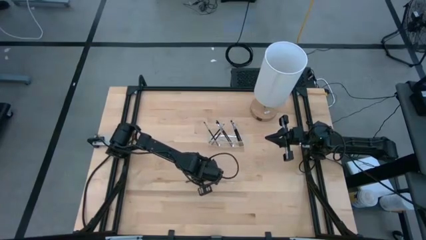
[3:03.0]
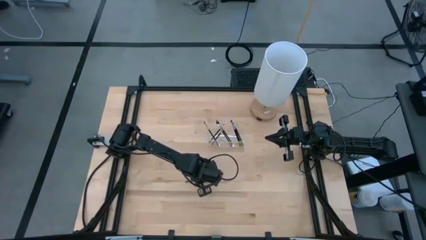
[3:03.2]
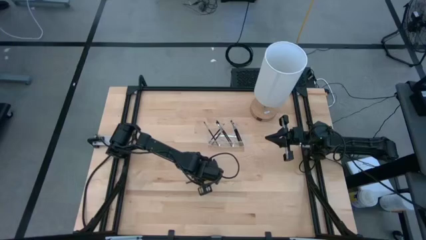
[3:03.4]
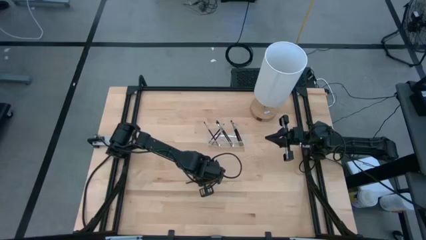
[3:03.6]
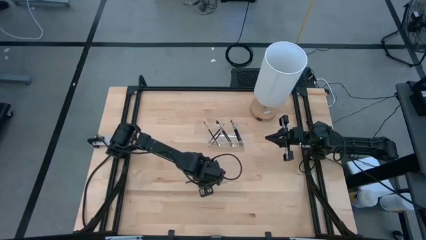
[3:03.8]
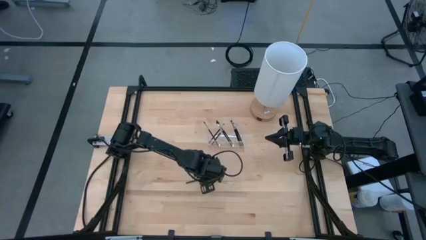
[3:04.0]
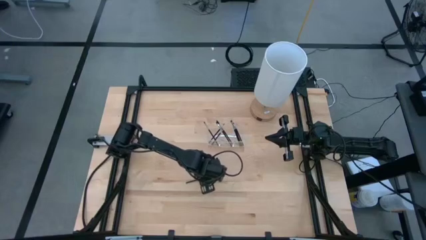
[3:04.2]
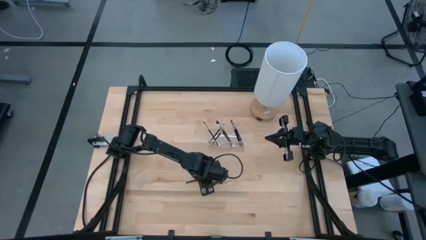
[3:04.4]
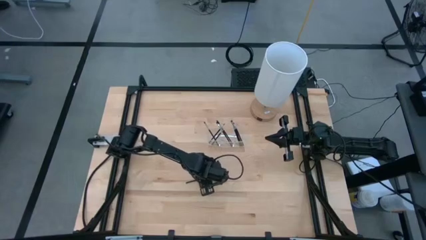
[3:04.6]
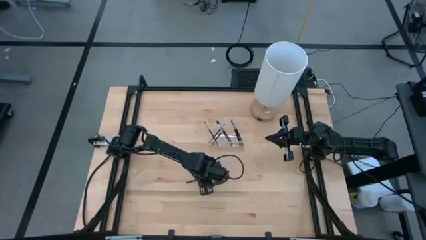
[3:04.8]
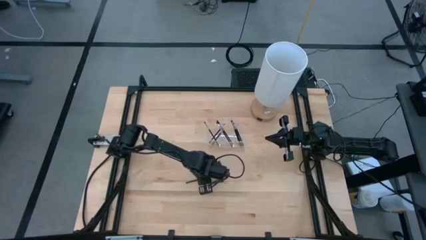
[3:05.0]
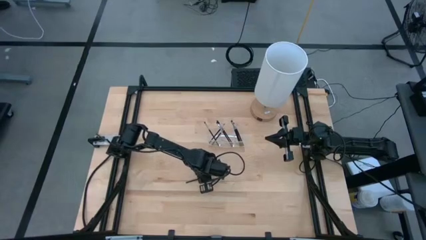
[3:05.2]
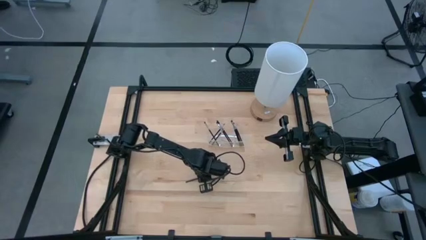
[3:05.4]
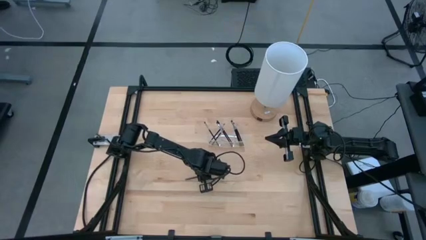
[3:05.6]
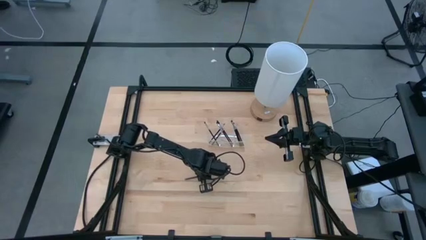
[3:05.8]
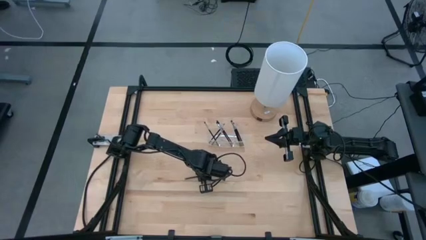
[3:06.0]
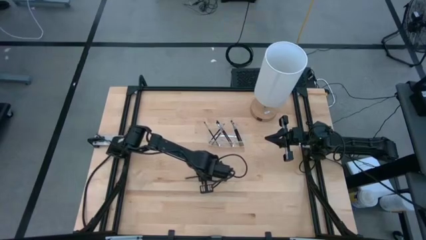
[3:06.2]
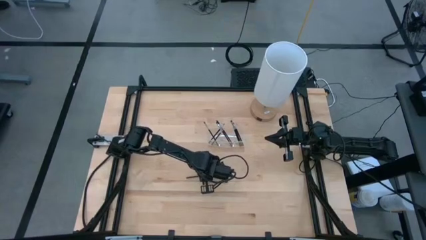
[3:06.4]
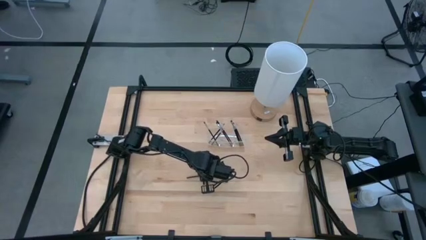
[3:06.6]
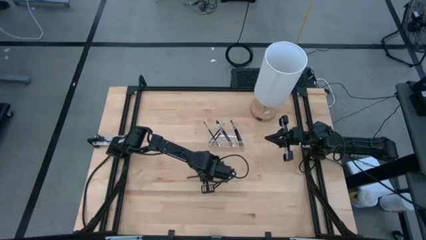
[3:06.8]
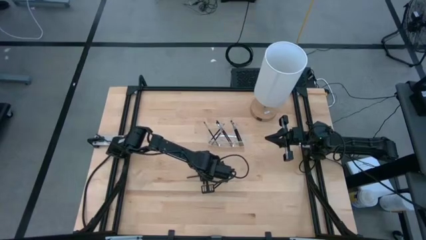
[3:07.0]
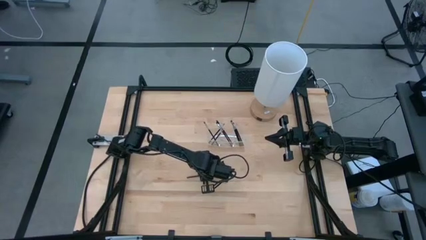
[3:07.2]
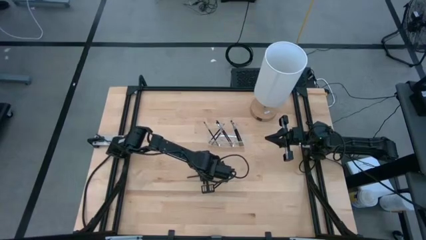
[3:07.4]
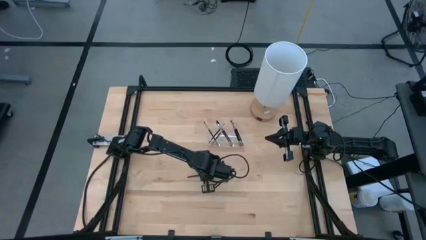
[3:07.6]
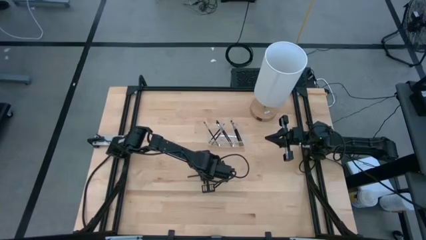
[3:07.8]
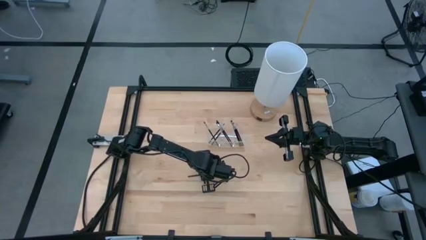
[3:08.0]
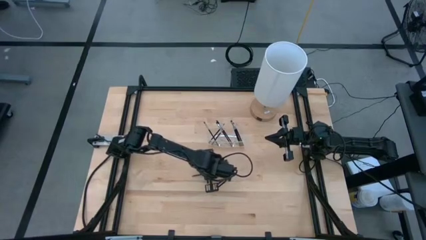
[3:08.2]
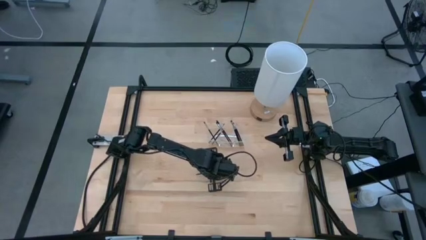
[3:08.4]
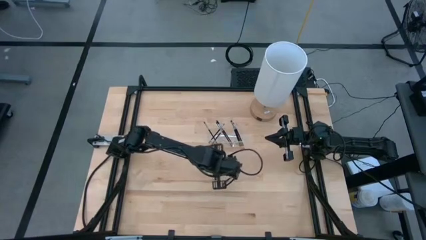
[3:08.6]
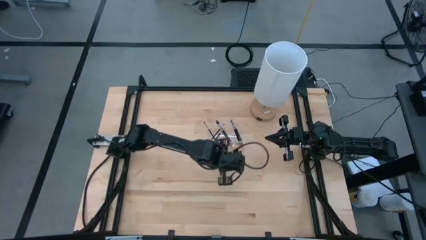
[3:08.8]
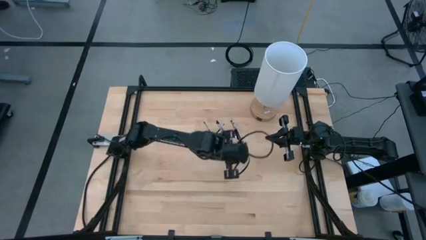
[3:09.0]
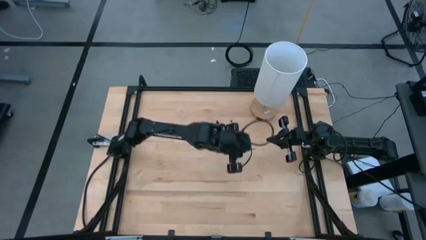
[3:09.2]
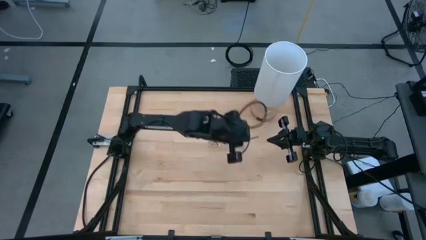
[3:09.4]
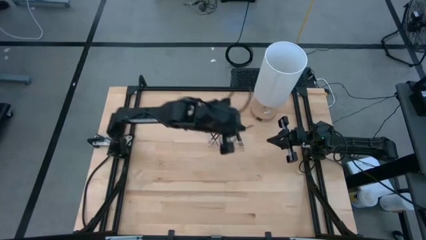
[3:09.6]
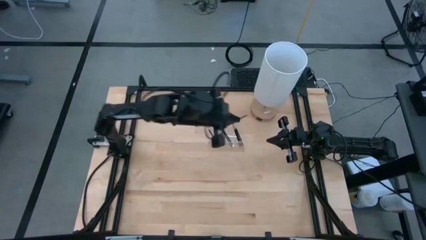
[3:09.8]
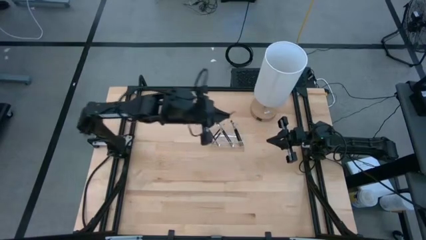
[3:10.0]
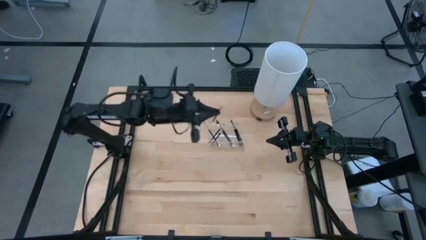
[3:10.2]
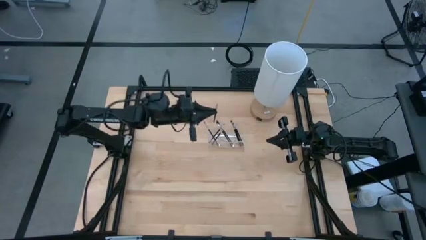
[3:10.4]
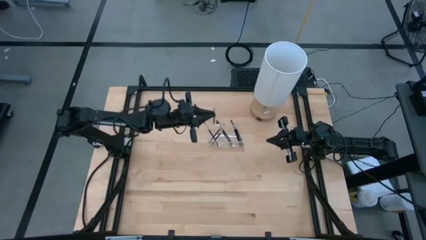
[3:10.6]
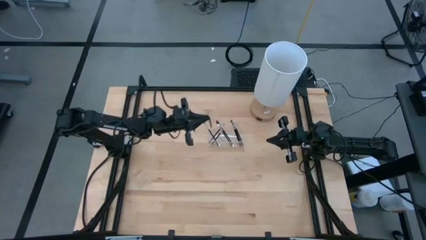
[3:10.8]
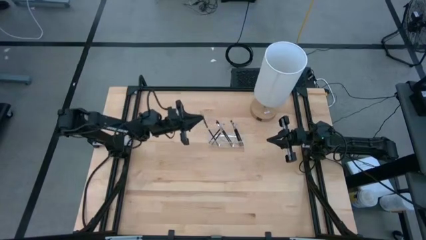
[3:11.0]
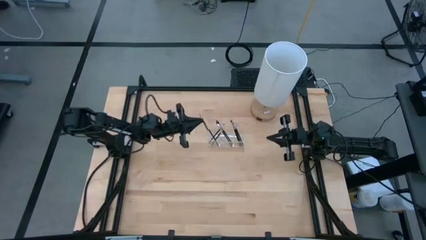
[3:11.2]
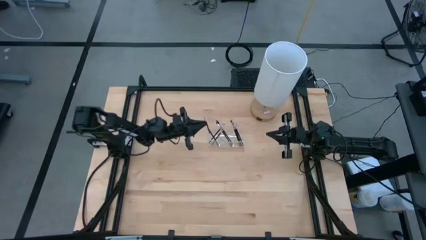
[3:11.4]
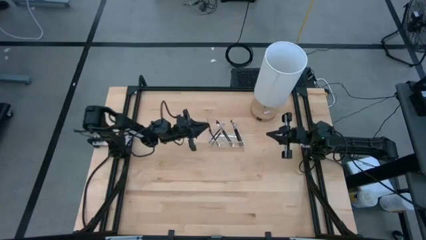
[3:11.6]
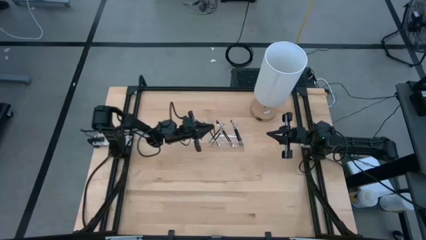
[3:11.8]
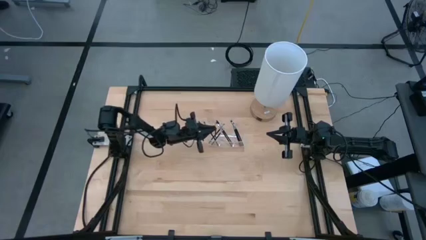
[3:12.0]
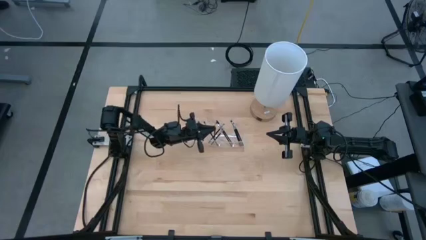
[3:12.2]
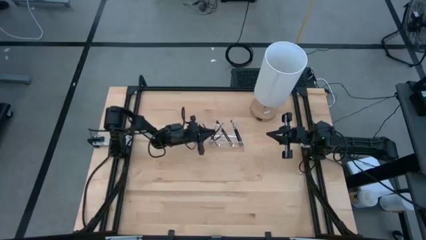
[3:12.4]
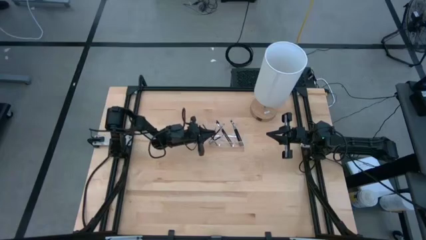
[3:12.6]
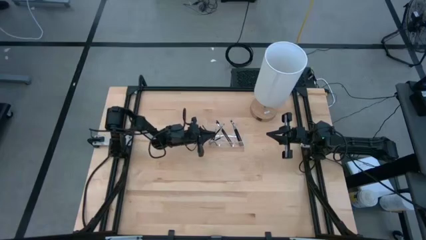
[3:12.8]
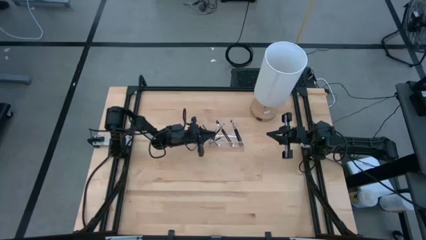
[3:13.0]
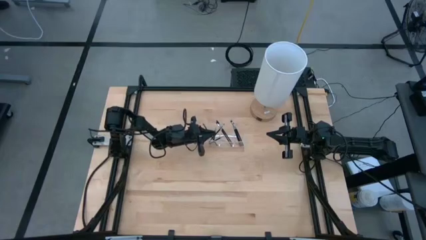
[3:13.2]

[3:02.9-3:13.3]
Task: Put items in baskets/containers
Put the black eyeshadow brush into the left section of the transparent organizer

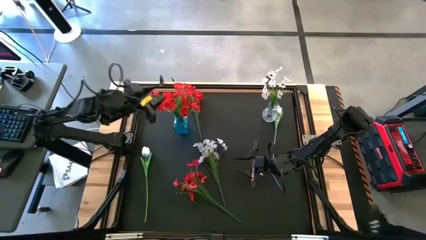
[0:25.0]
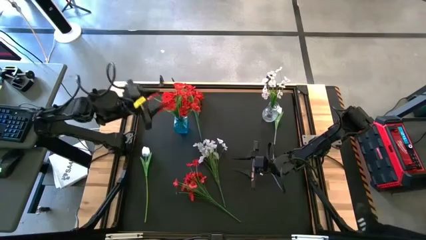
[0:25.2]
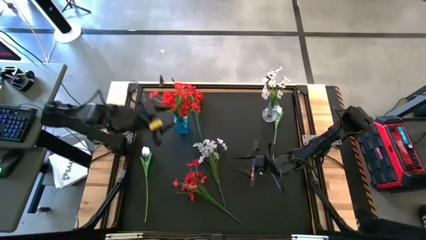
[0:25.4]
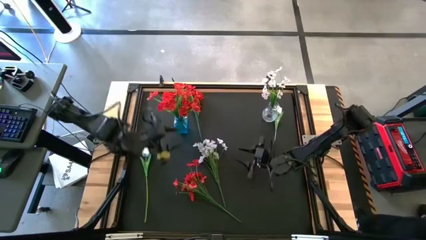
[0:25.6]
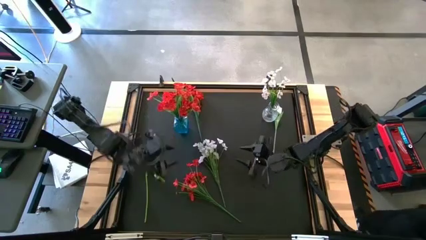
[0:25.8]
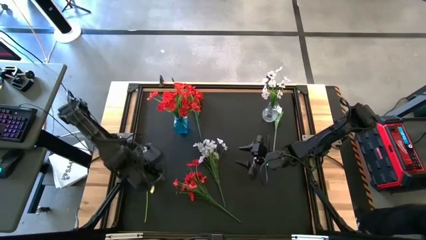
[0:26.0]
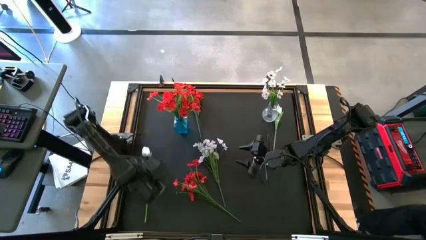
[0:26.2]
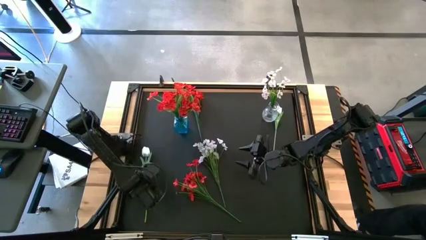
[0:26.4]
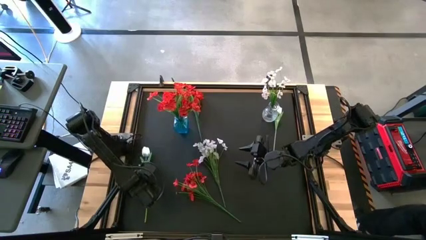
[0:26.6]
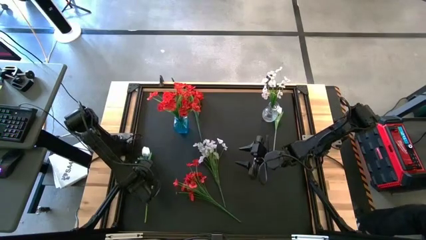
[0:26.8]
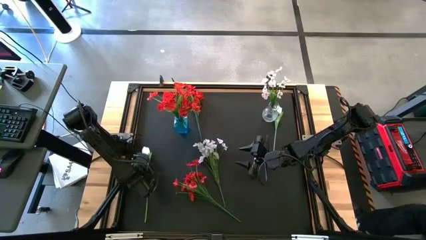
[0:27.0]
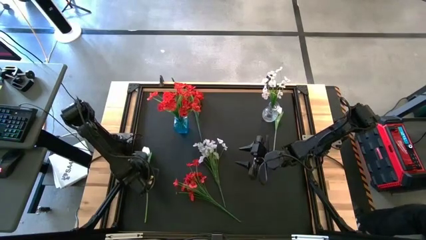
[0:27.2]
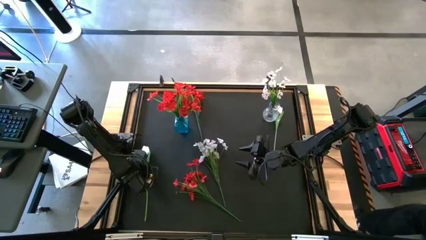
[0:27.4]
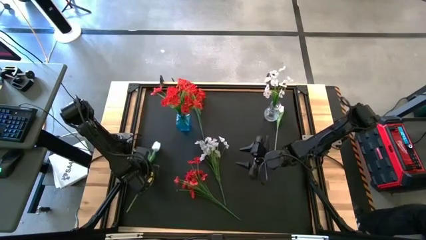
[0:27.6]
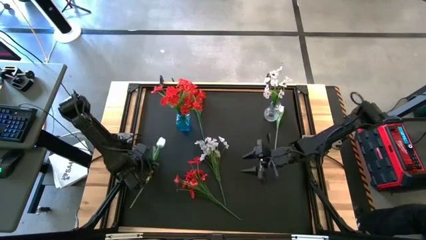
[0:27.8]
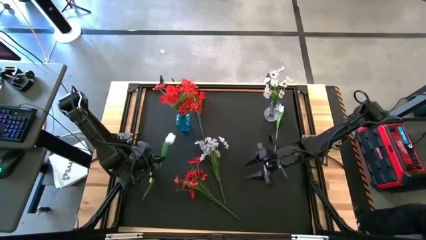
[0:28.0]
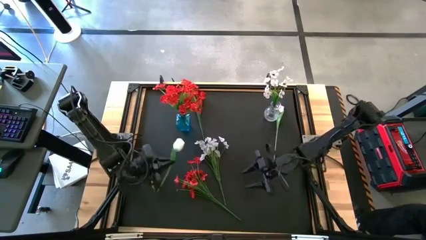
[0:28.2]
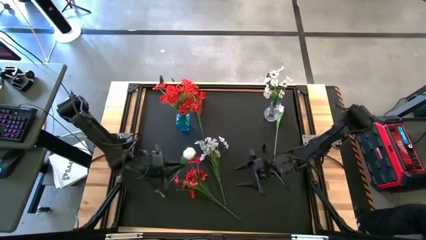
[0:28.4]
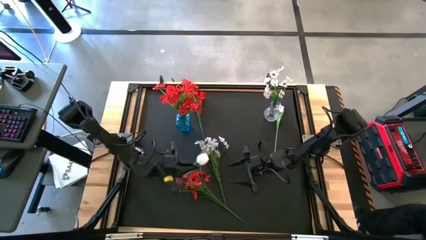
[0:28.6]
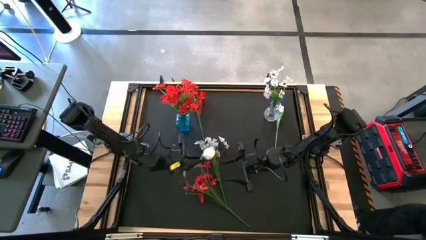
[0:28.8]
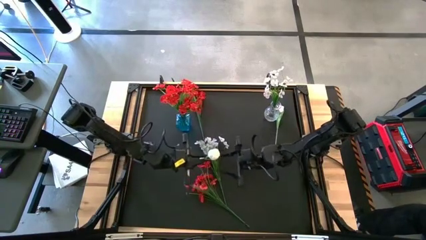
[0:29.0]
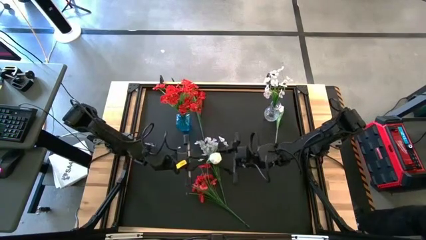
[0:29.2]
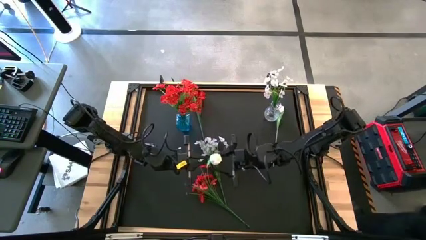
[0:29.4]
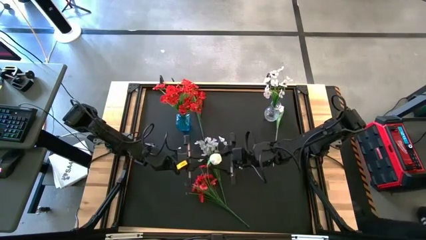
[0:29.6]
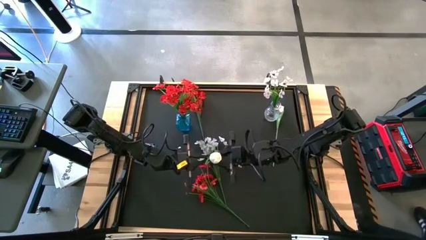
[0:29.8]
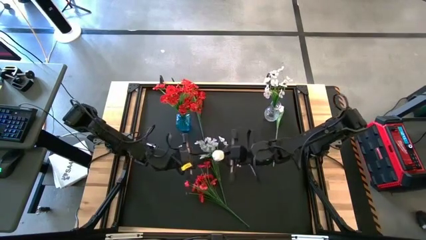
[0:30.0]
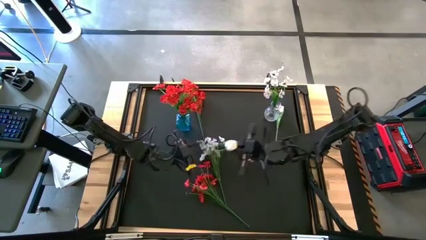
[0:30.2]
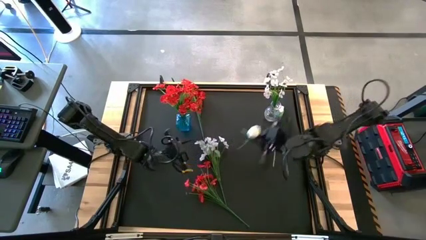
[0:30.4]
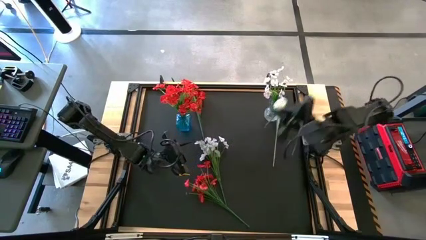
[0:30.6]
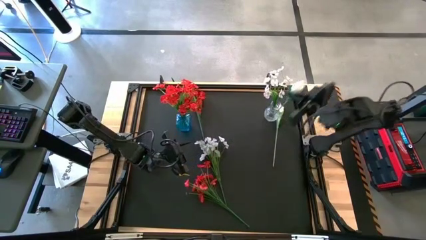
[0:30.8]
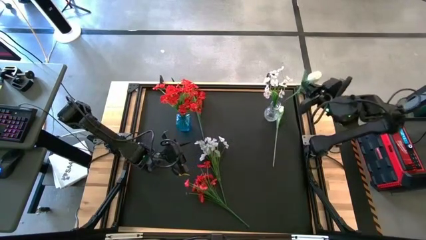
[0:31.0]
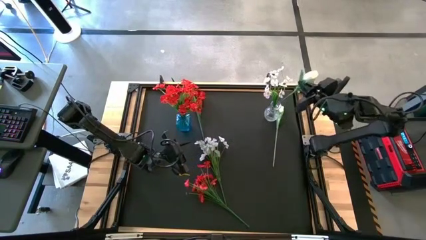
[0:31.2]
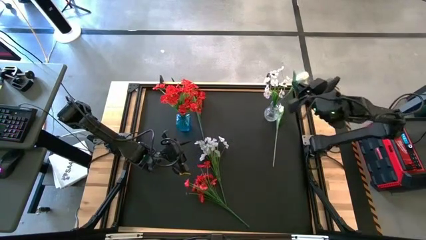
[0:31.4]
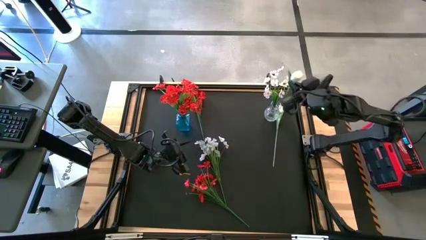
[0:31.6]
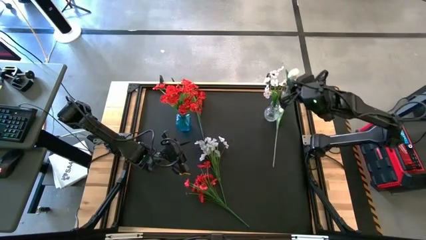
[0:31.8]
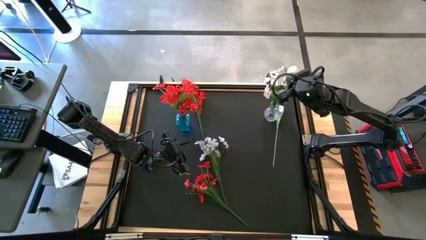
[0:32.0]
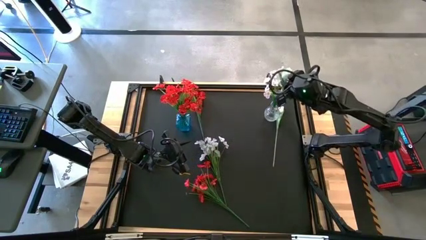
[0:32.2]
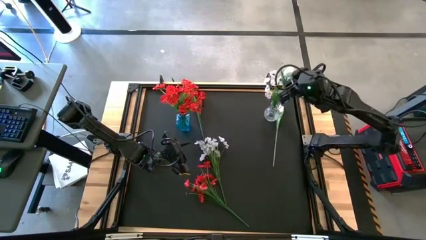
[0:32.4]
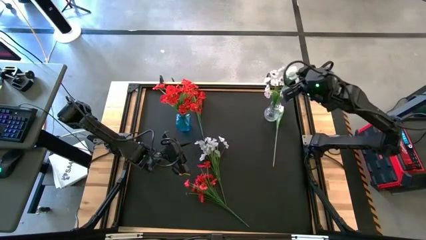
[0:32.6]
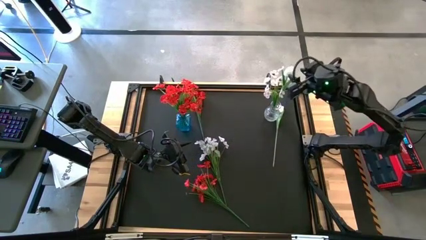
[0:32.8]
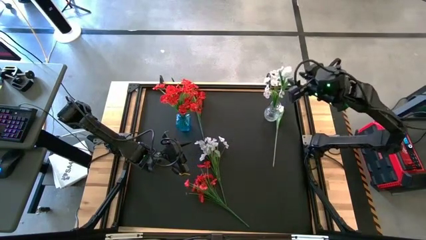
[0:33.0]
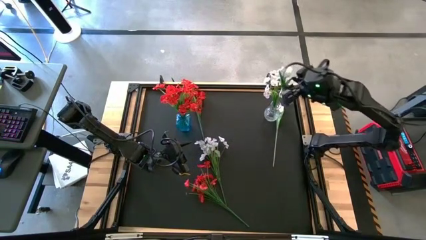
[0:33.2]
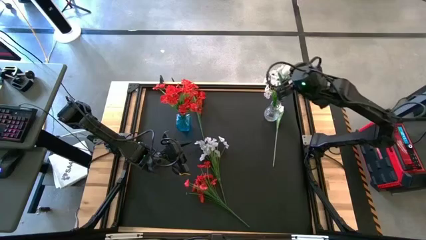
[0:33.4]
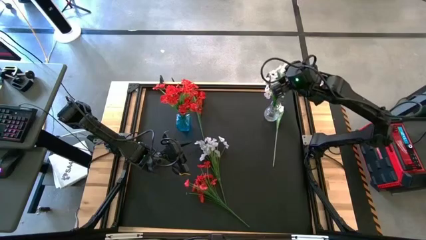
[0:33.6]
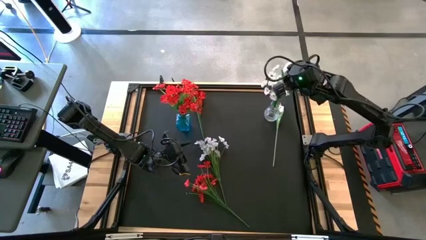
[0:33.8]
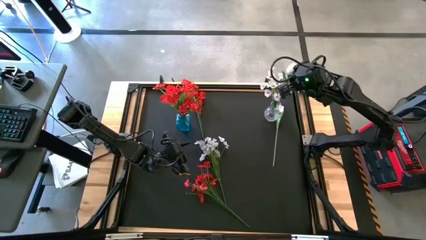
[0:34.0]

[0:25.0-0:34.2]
Task: Sort flowers into vase by color
Put the left white flower into the transparent vase
